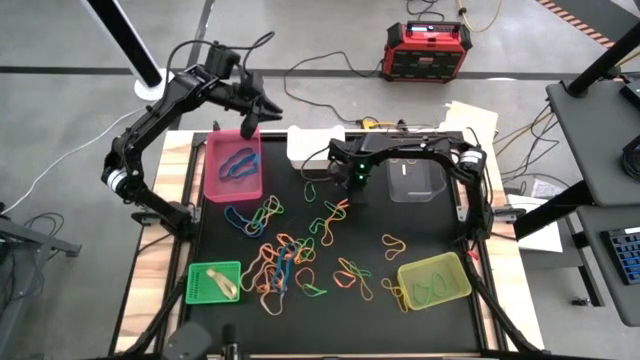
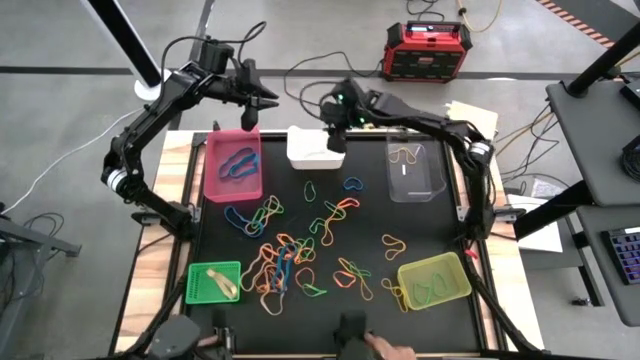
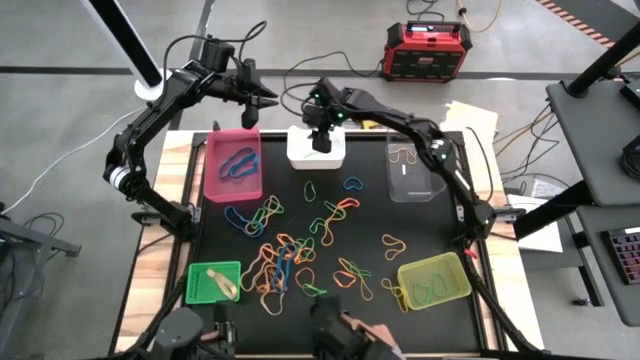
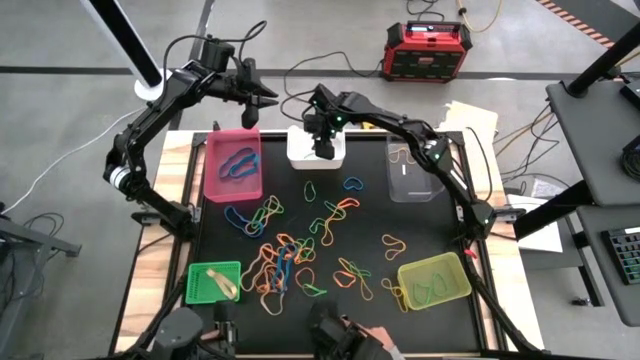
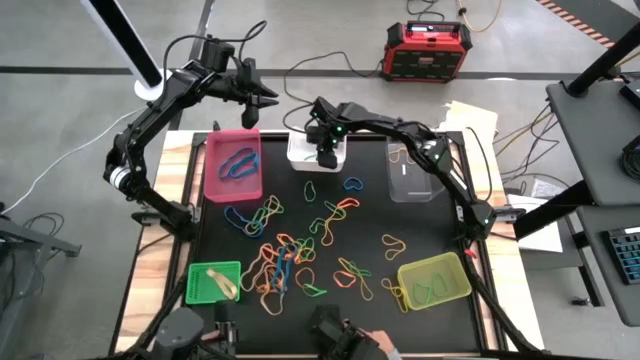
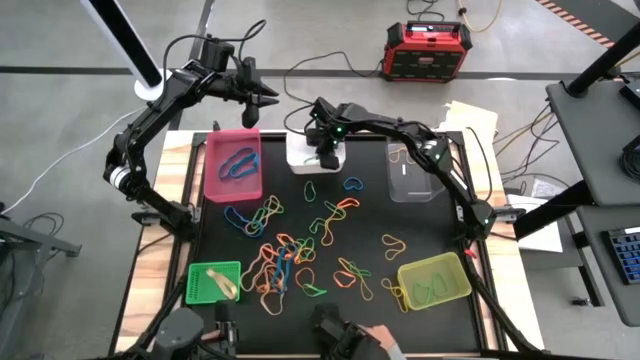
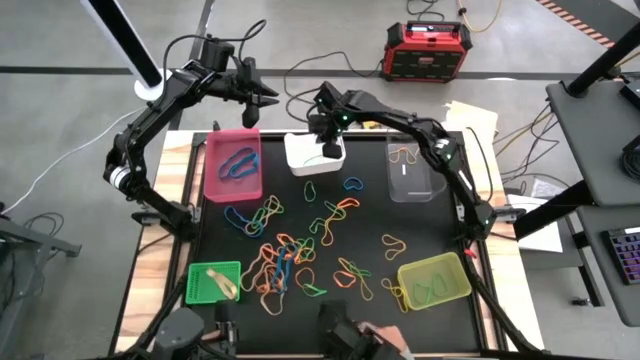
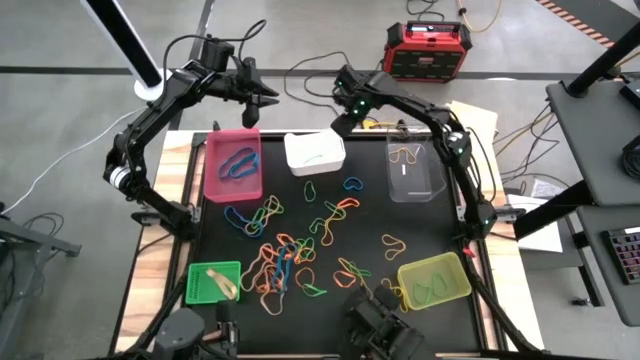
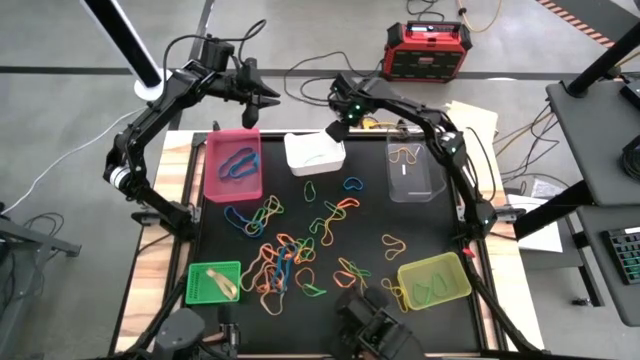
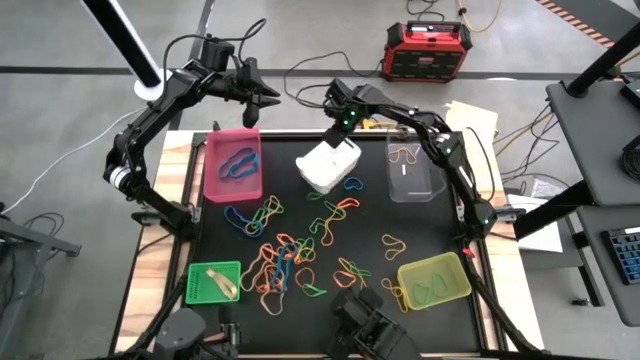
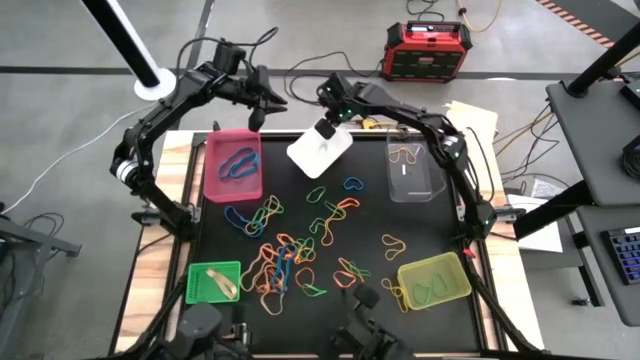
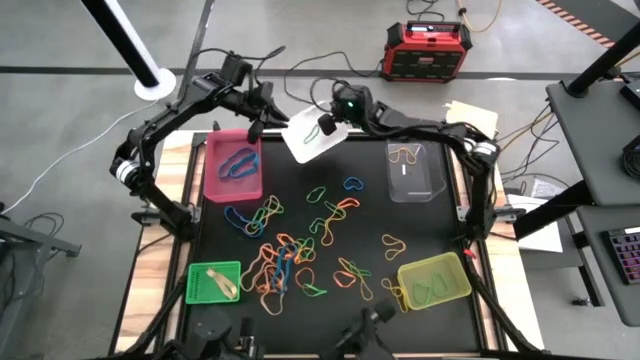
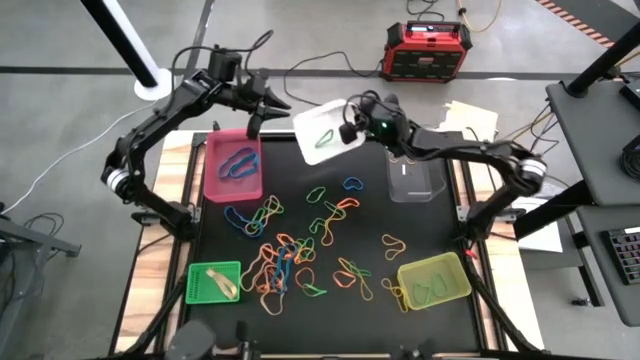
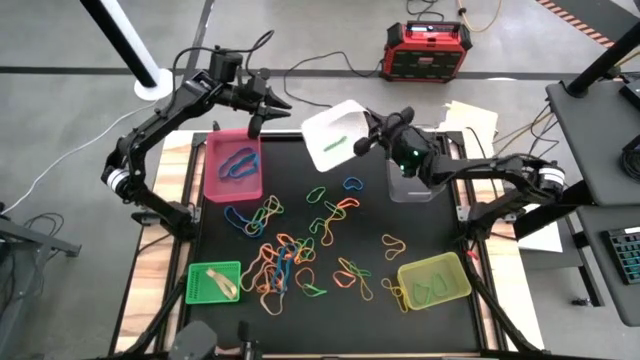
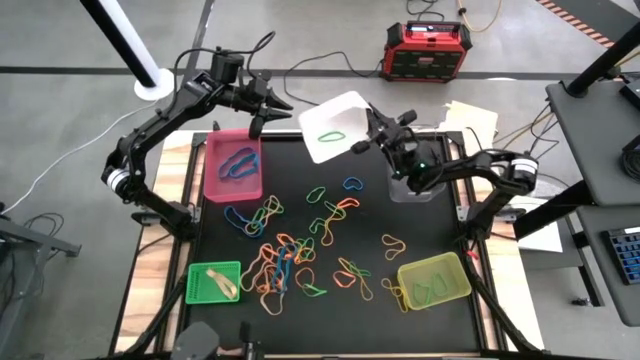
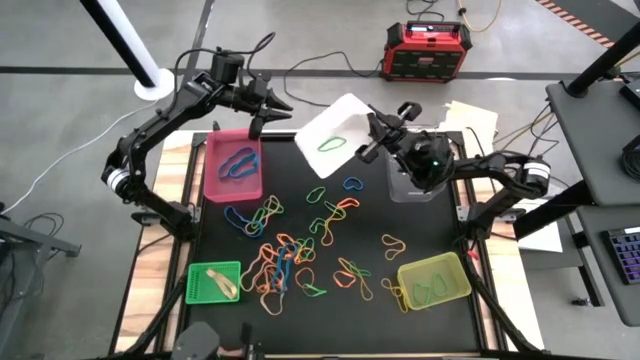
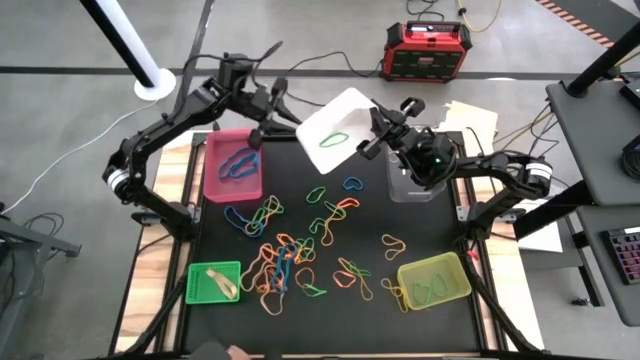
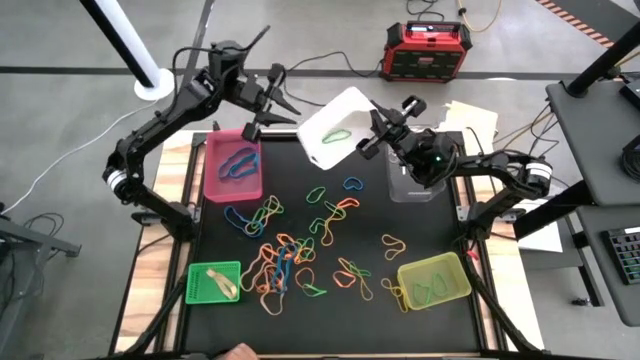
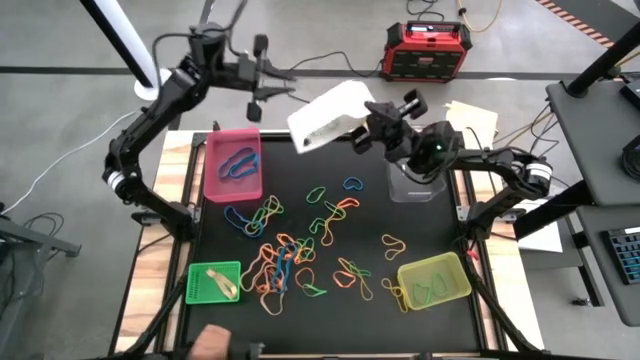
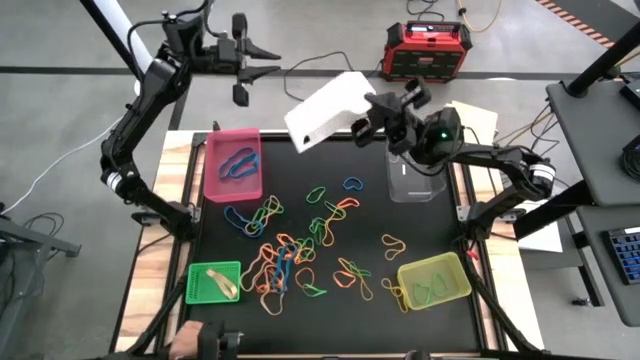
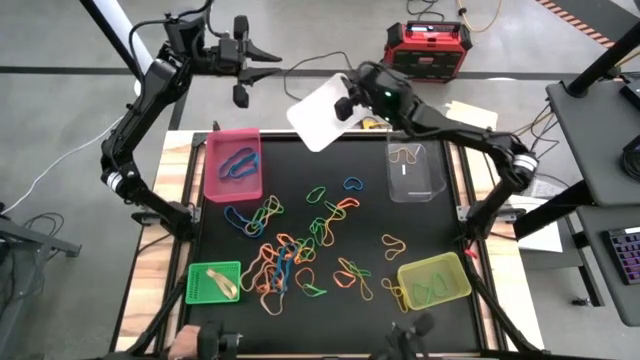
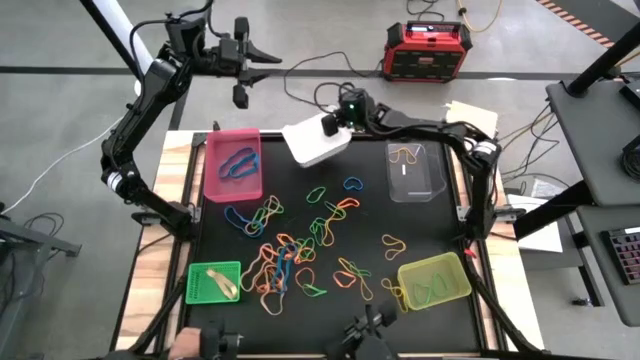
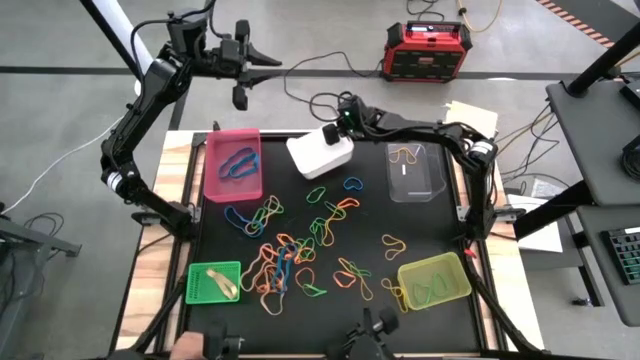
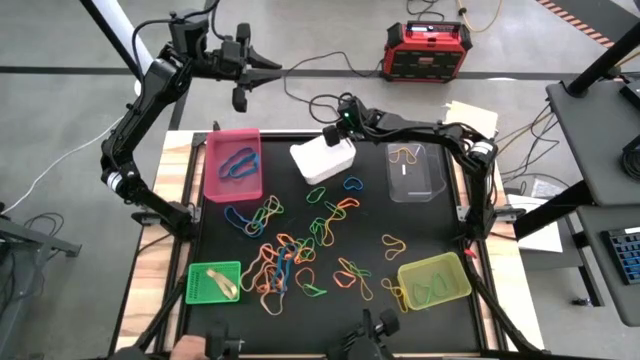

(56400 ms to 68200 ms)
Task: Sort rubber bands into baskets
Remove the green rubber band from the white bin

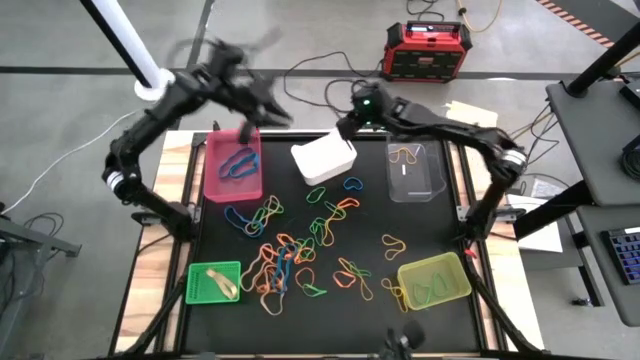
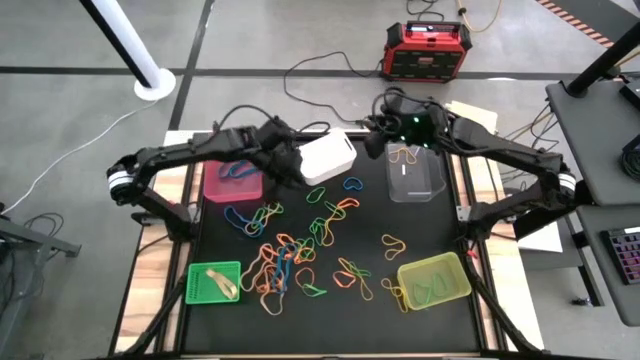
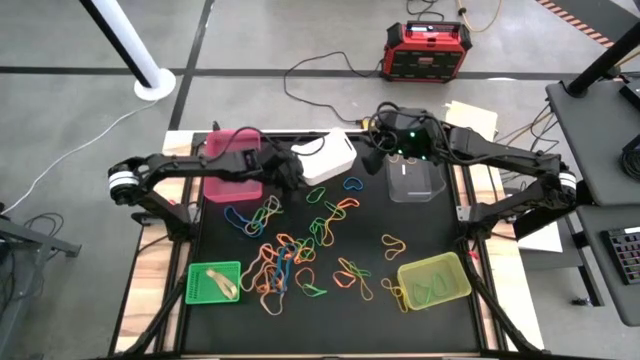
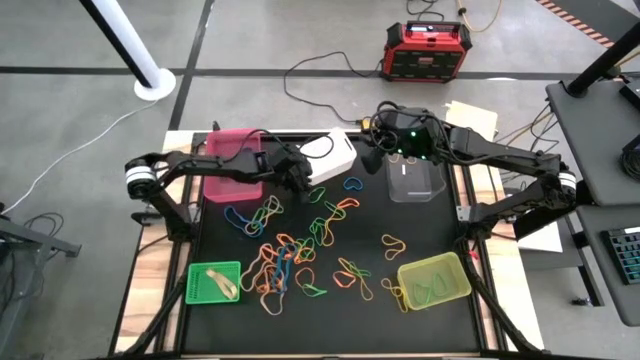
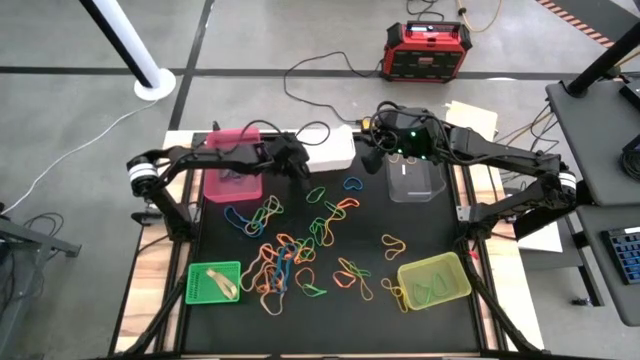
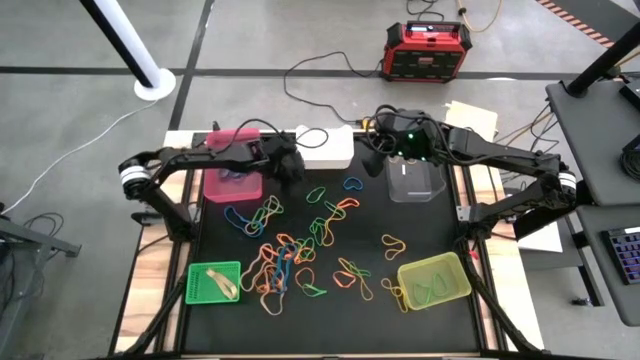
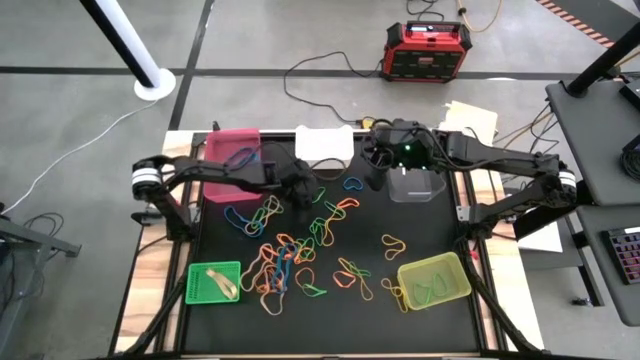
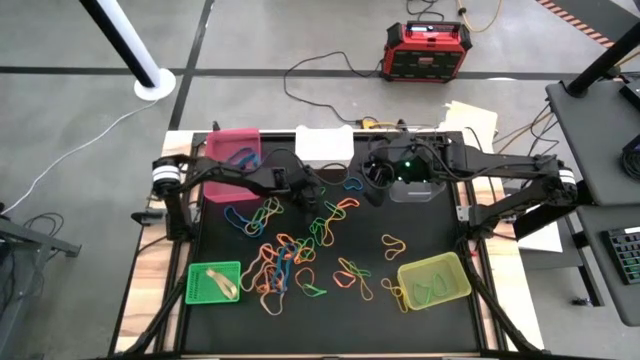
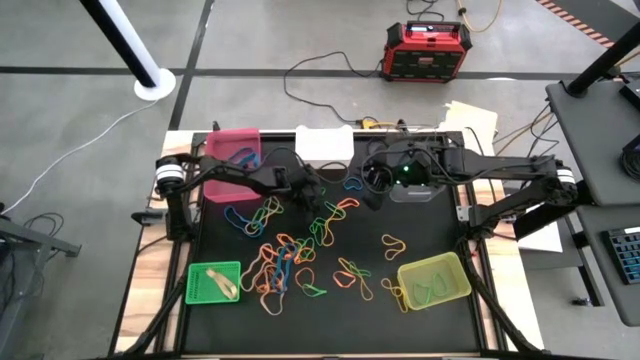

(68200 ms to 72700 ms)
Put the green rubber band into the yellow bin

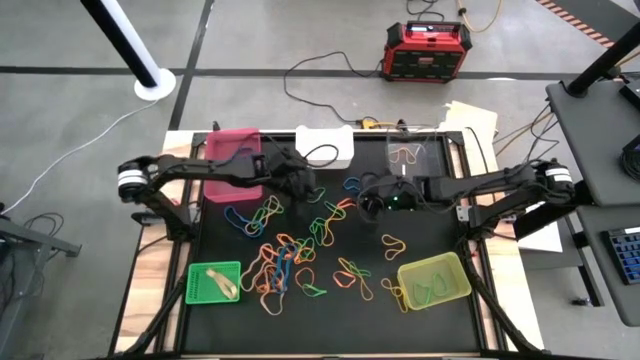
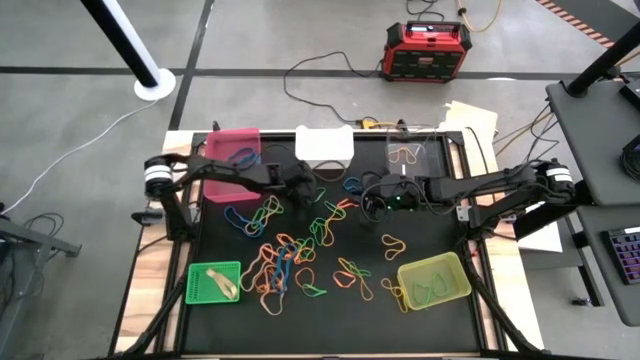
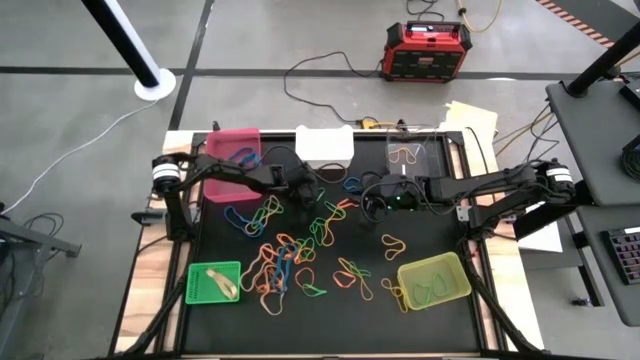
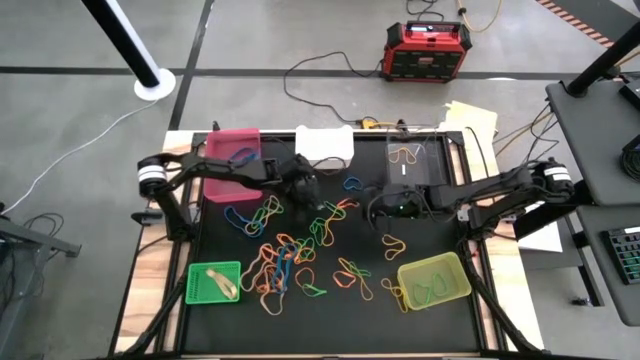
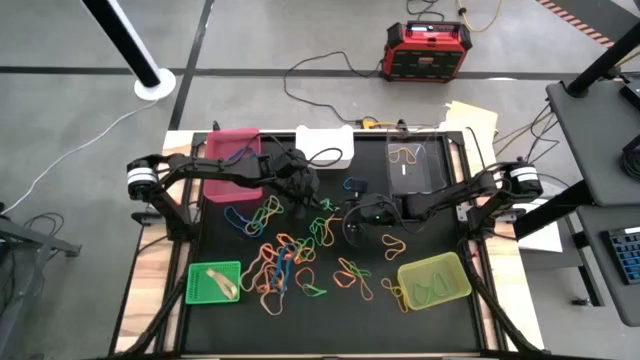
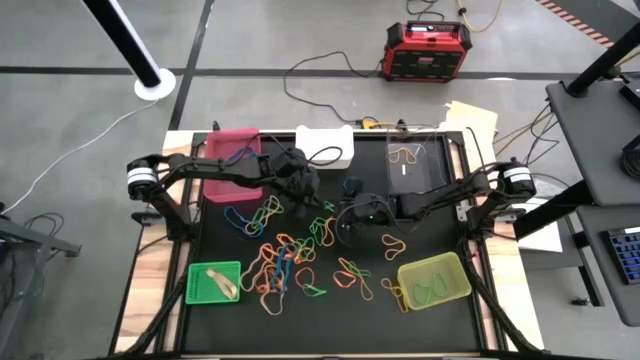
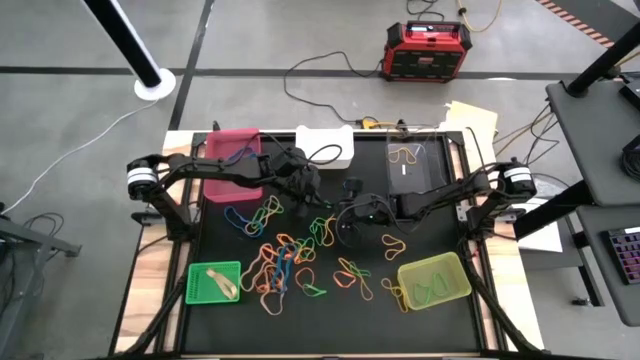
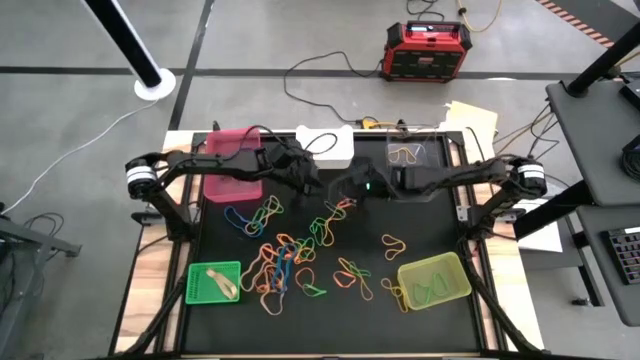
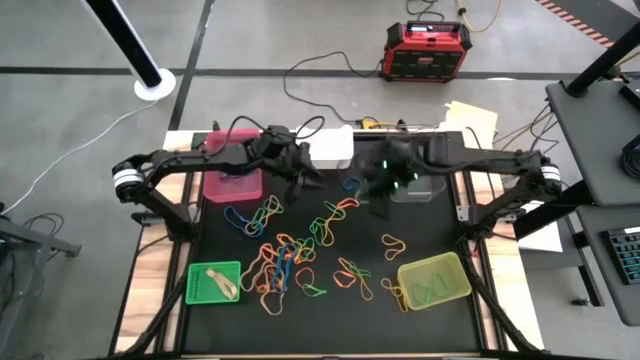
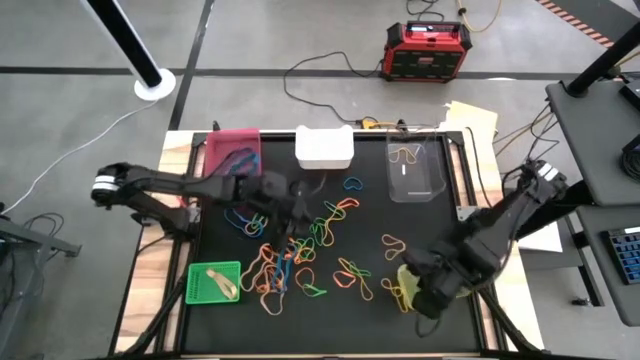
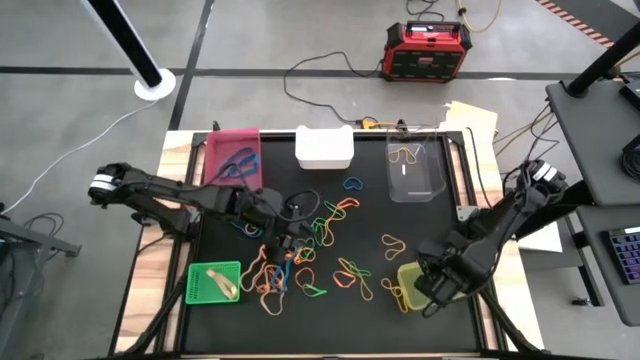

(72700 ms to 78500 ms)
Put the green rubber band into the yellow bin
